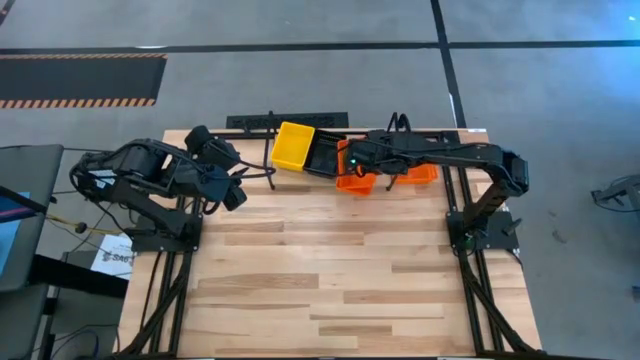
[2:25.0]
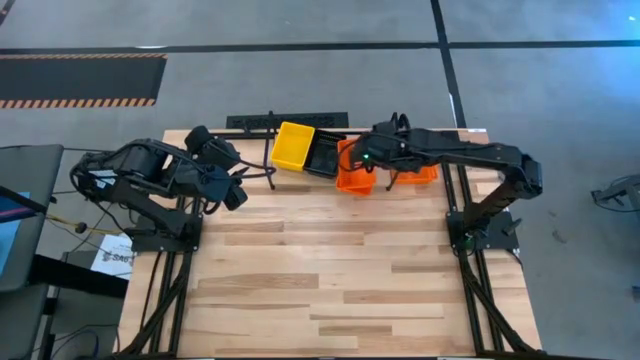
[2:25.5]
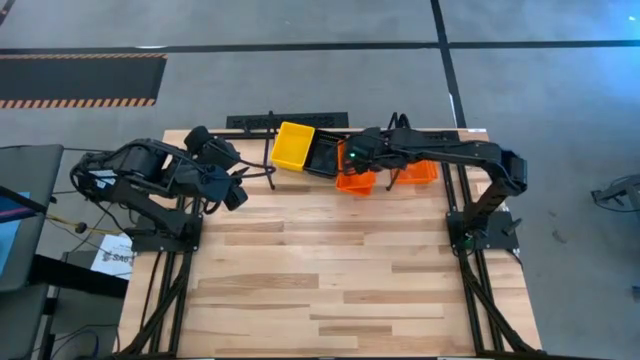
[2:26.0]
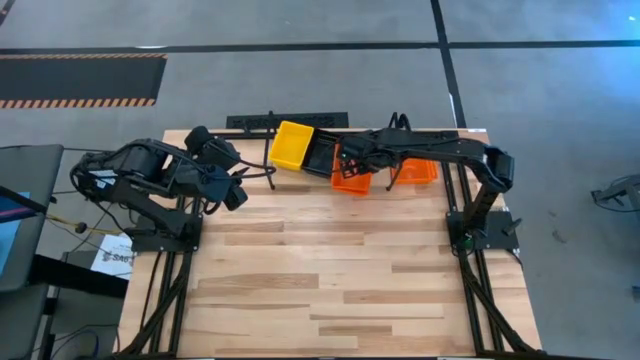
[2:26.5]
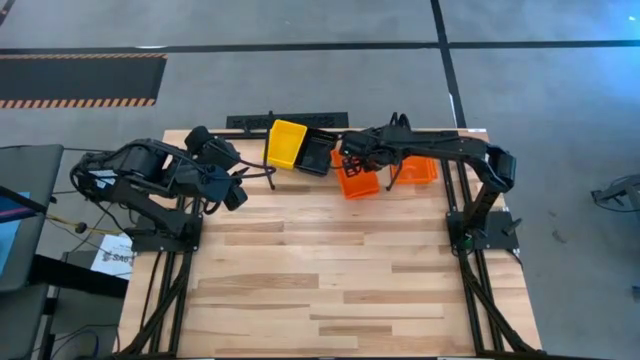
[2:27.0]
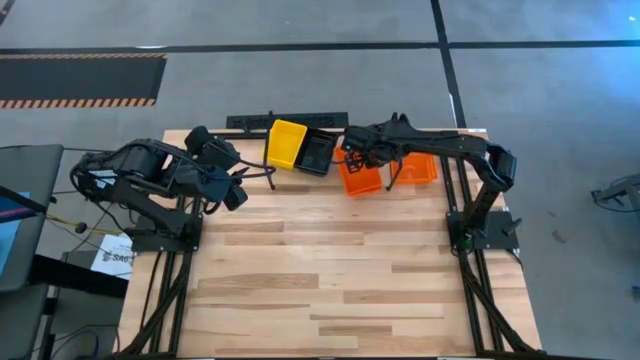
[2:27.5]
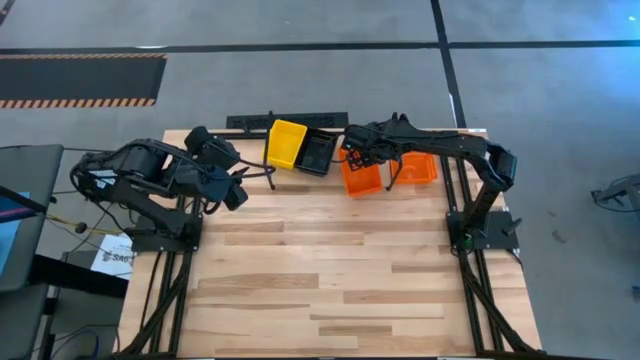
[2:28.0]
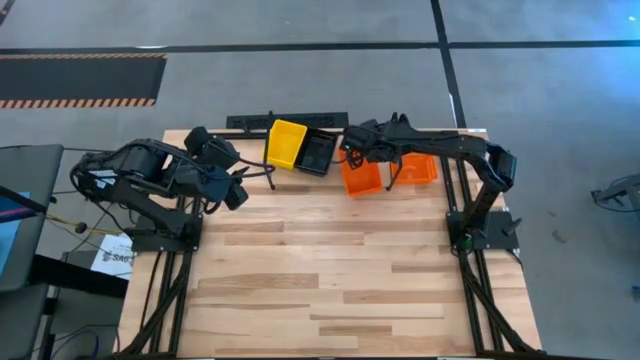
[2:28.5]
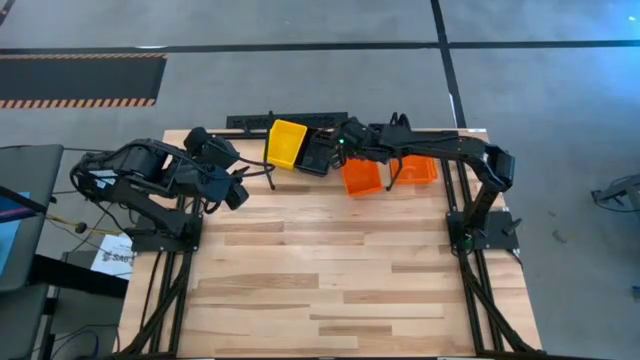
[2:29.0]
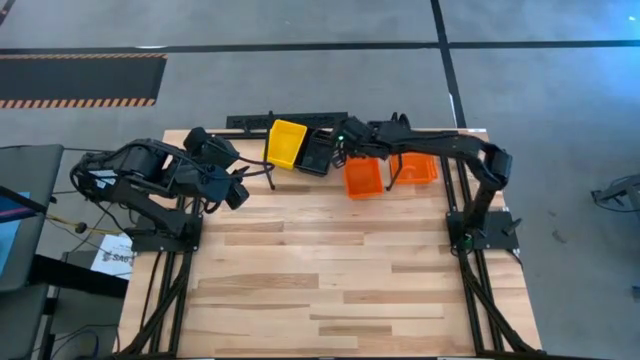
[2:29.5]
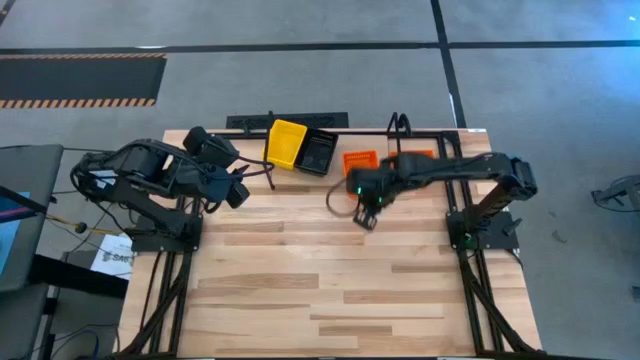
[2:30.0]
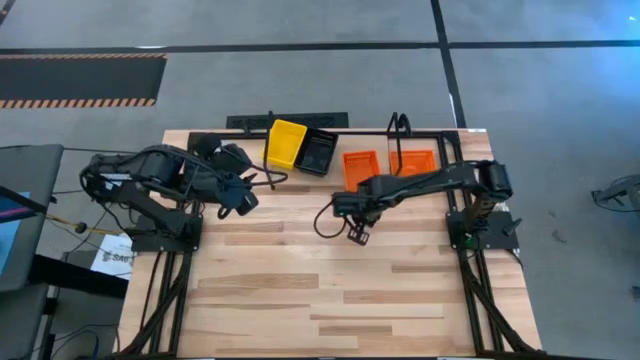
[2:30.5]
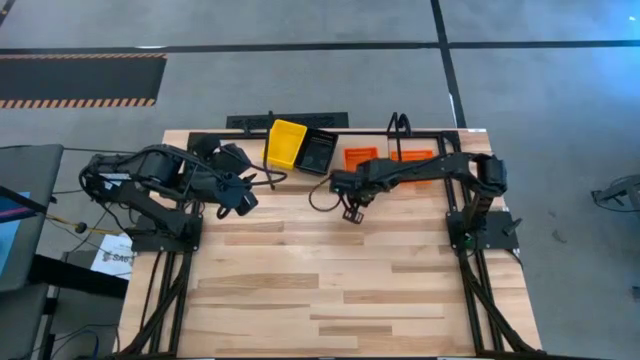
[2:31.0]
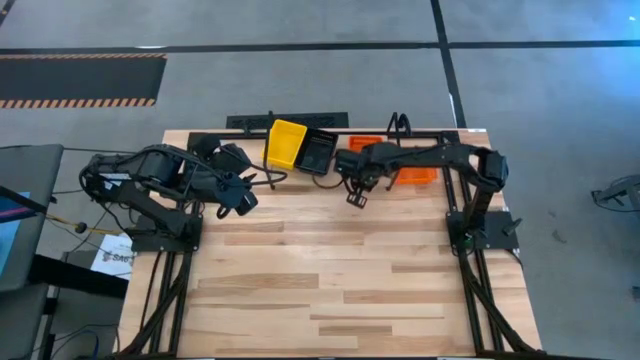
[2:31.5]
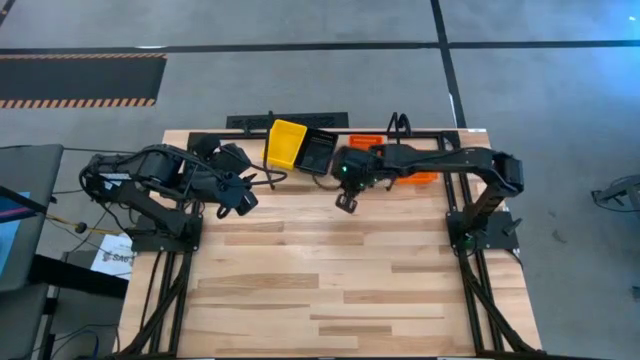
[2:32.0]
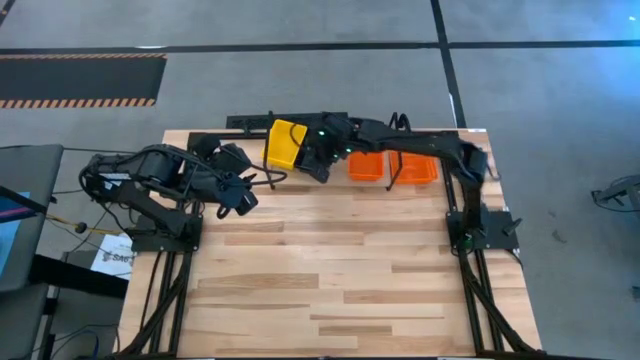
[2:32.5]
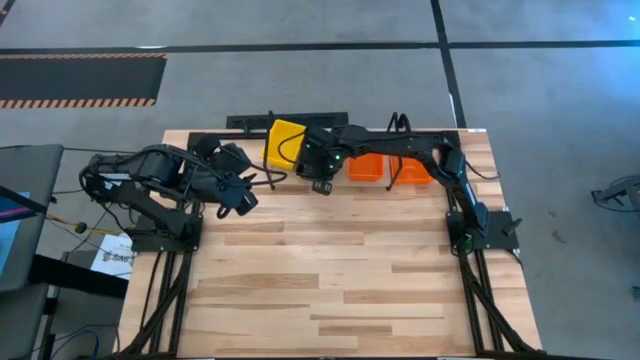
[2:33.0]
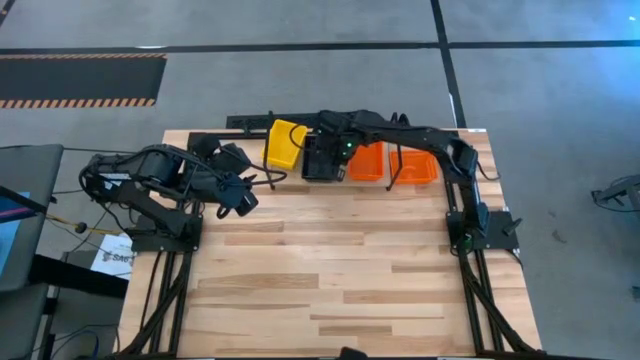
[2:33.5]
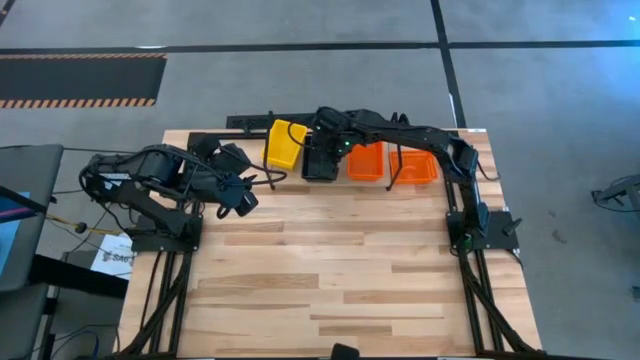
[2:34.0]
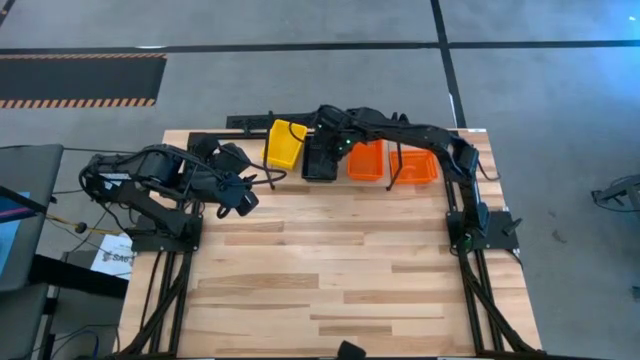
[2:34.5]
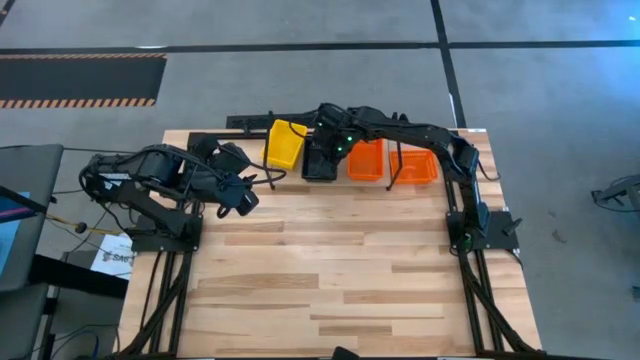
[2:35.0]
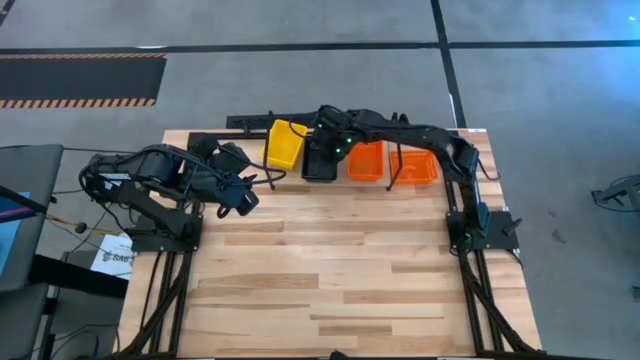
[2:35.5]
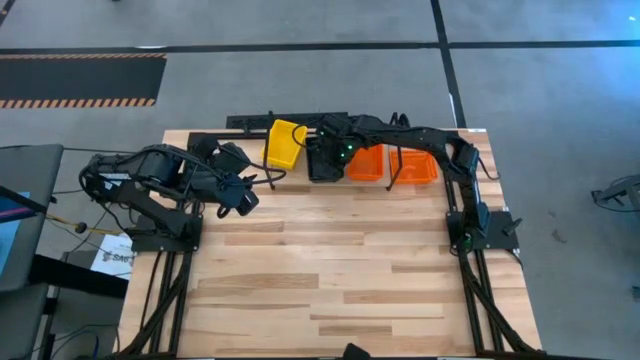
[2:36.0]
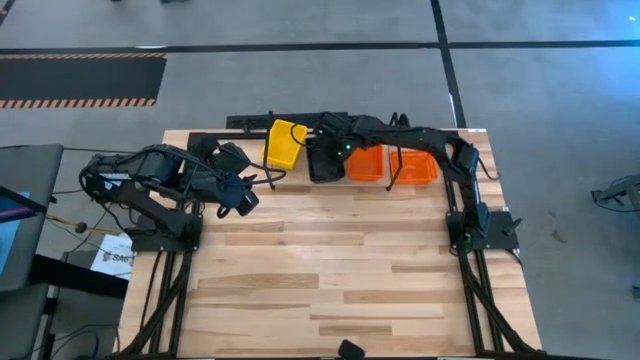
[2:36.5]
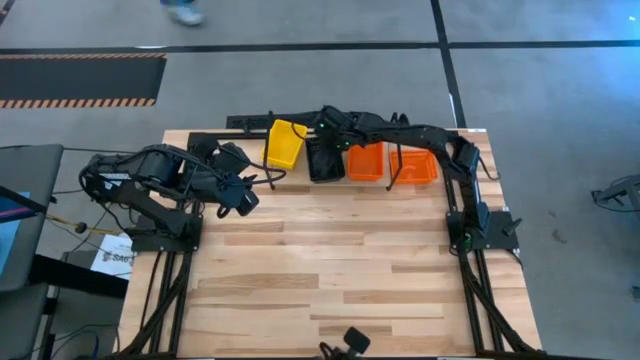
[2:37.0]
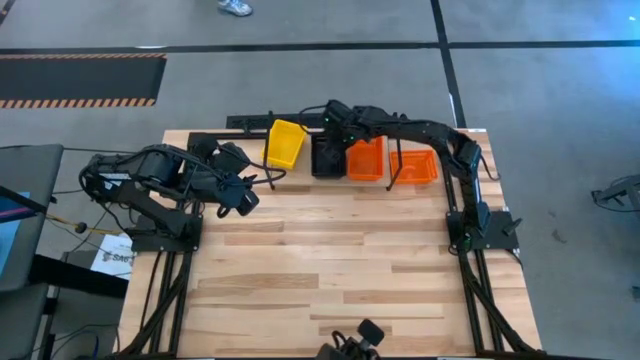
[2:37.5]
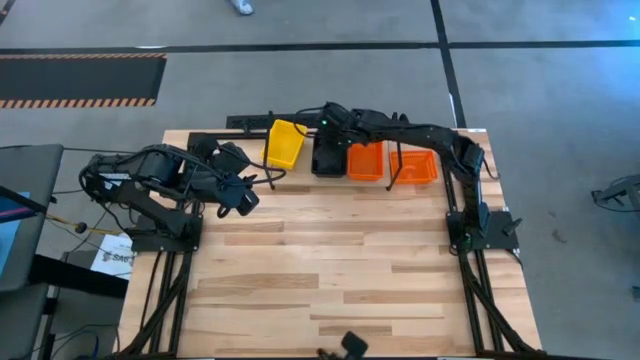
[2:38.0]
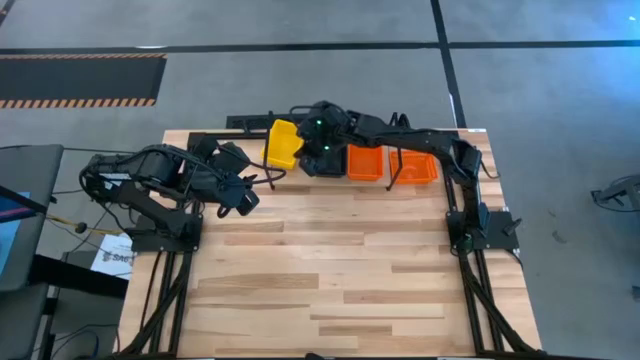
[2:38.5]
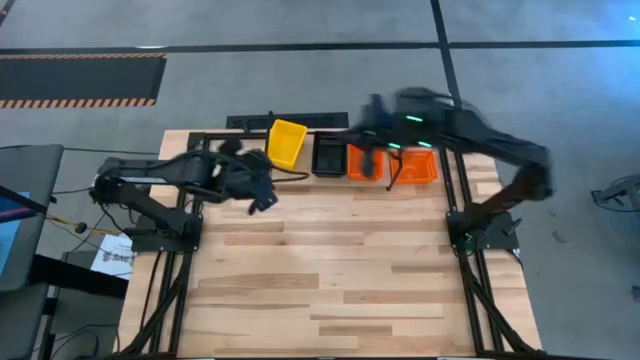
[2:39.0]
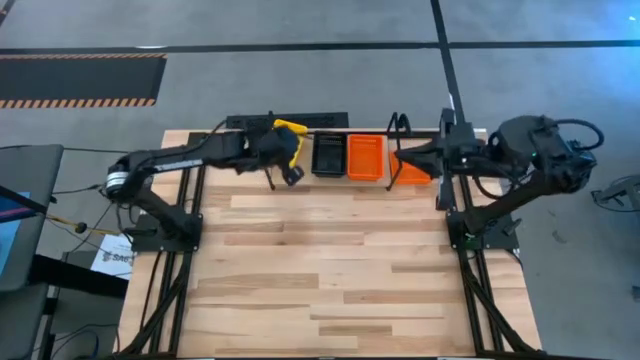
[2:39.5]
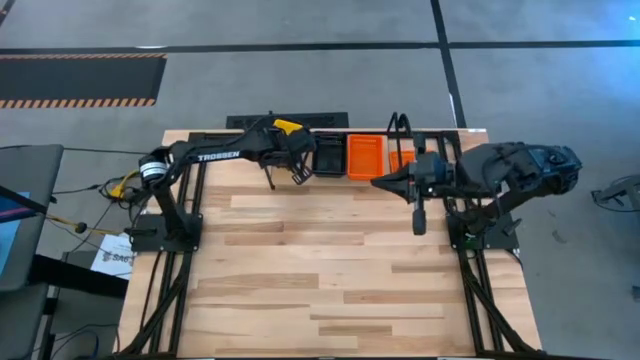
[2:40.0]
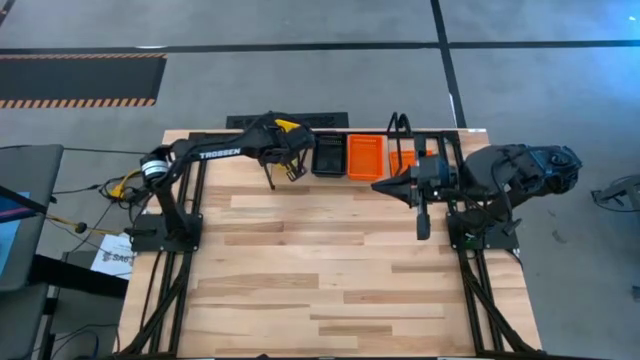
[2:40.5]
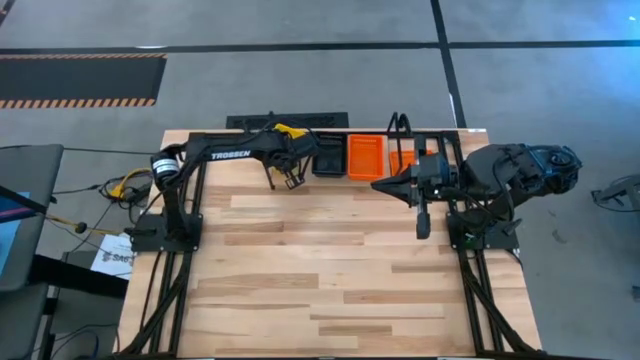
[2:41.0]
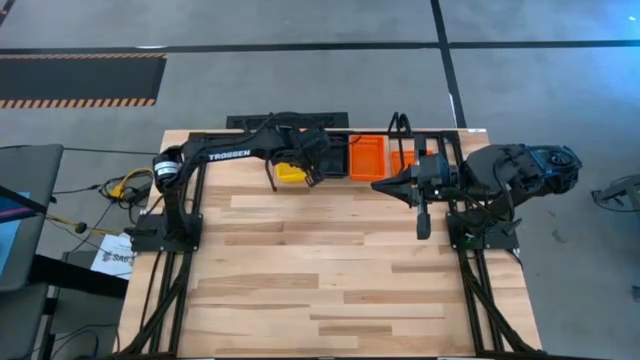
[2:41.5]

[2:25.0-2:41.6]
Task: Stack baskets on shelf by color
Stack the orange bin on top of the other orange bin on the shelf

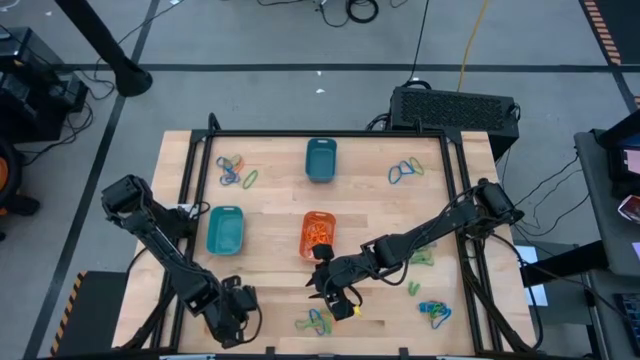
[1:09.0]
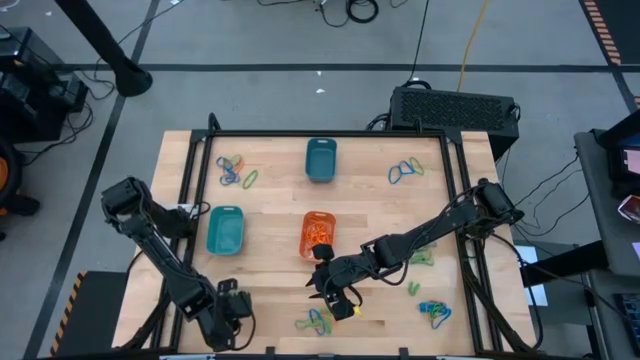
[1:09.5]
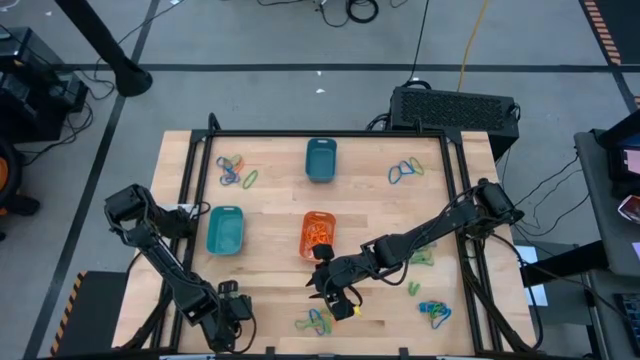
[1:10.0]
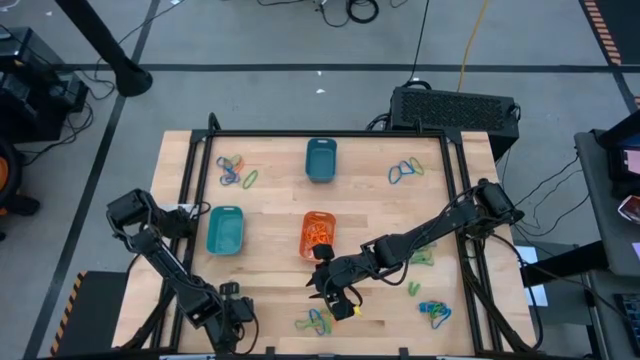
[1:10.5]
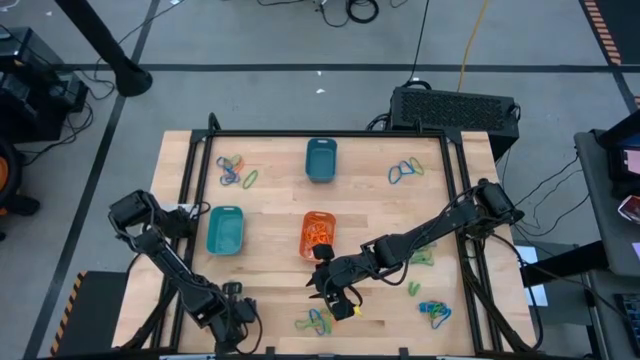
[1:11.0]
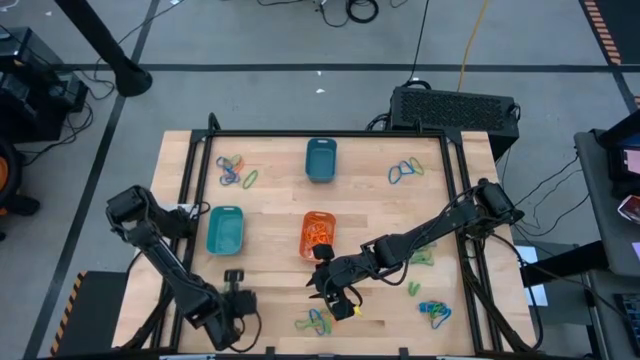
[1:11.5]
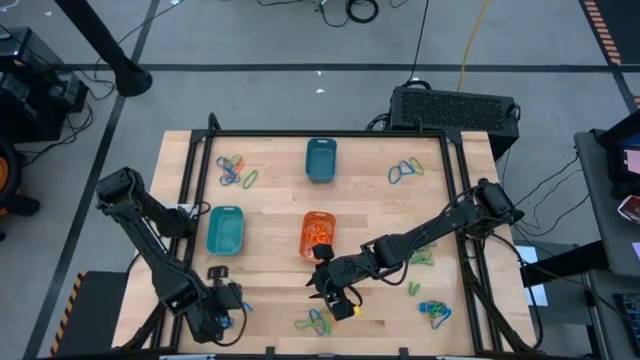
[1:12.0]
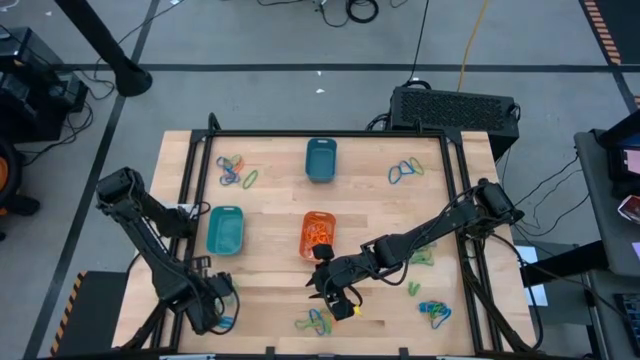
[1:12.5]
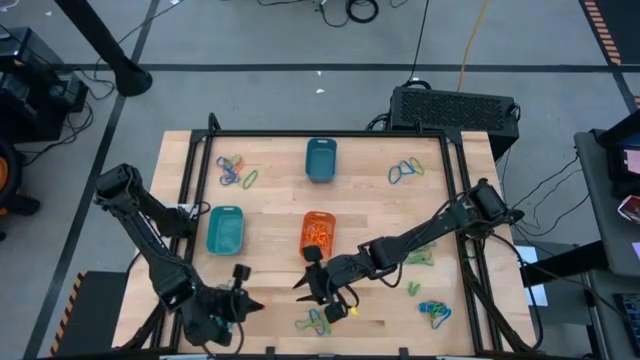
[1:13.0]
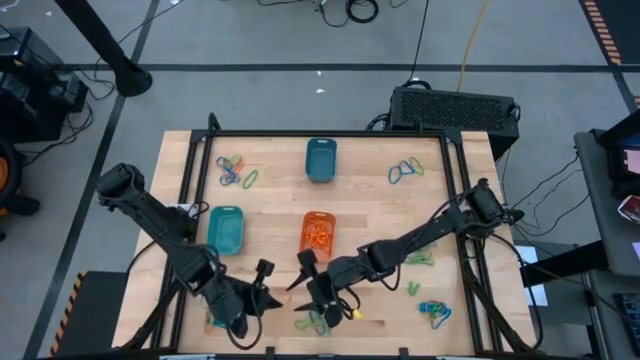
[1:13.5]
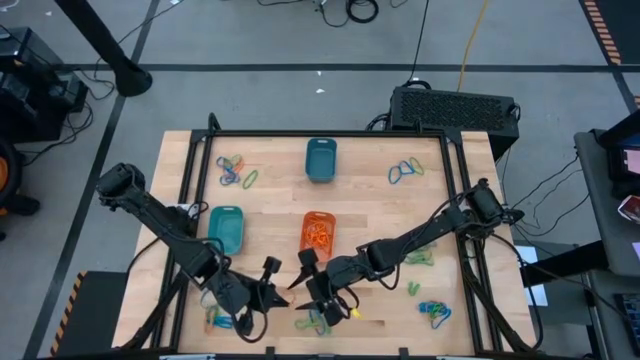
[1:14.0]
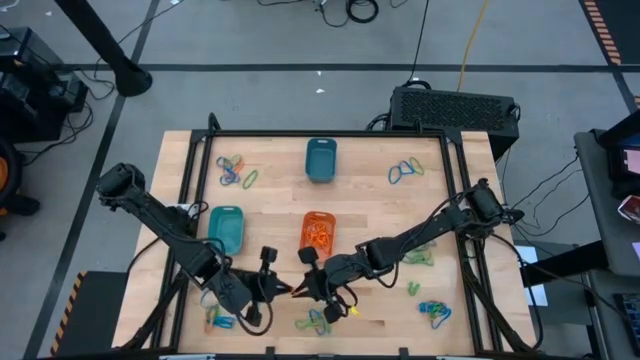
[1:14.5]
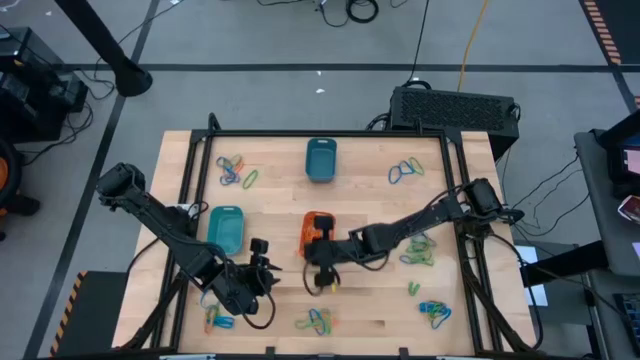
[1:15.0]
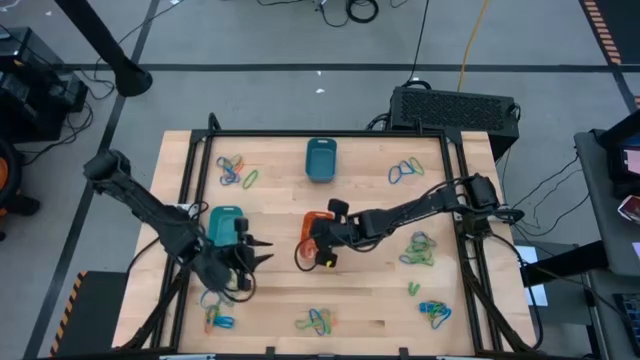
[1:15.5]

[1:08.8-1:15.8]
Task: Sort rubber bands into baskets
Put the orange rubber band into the orange bin
